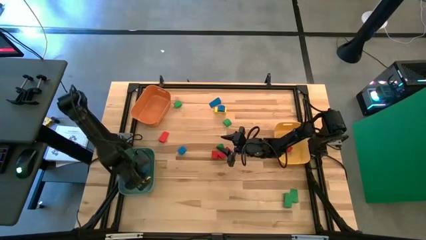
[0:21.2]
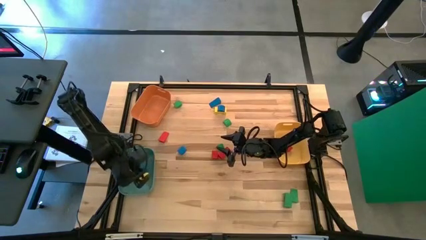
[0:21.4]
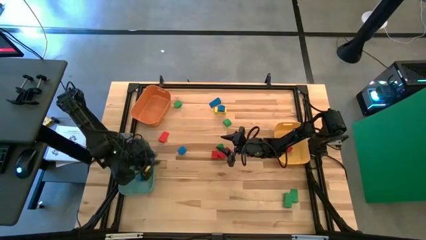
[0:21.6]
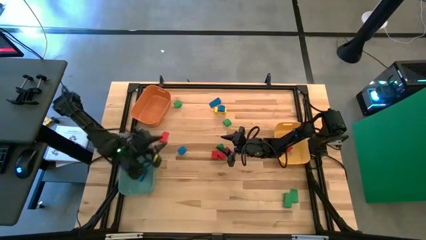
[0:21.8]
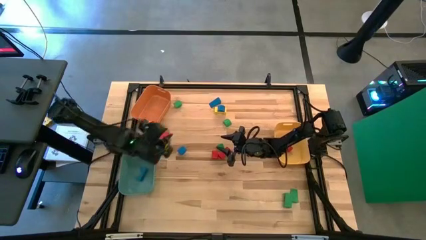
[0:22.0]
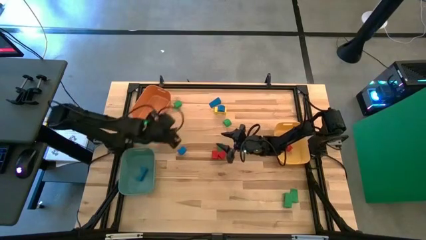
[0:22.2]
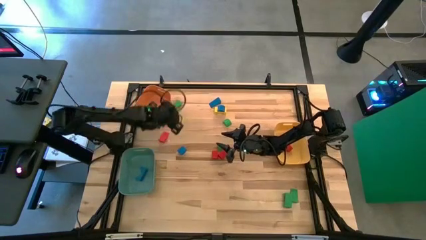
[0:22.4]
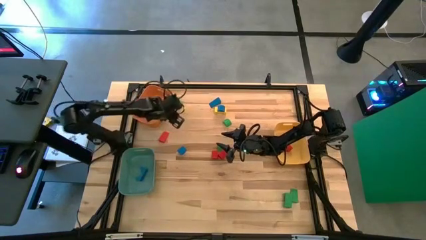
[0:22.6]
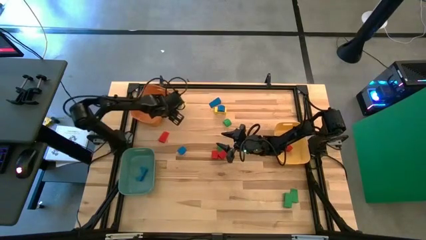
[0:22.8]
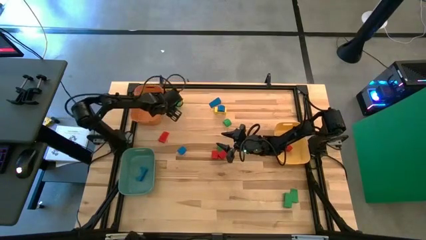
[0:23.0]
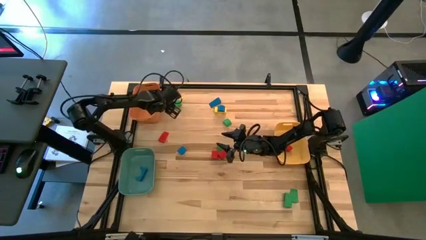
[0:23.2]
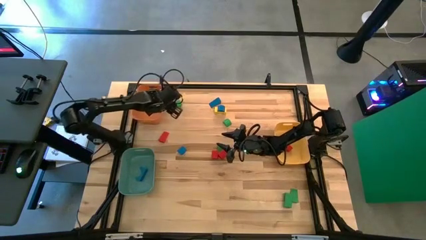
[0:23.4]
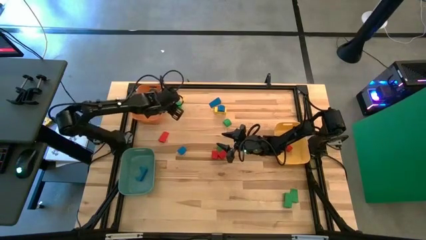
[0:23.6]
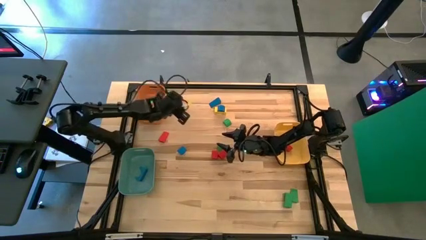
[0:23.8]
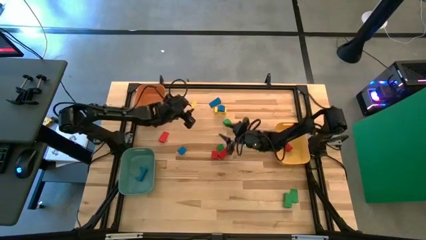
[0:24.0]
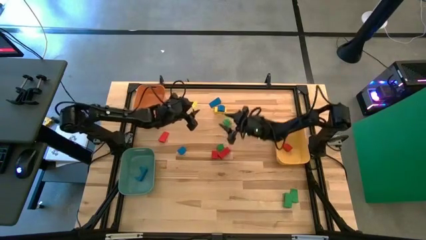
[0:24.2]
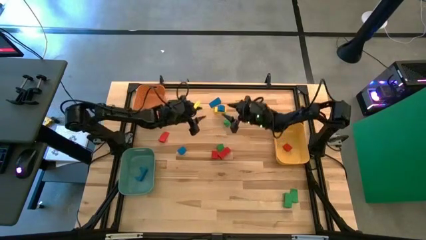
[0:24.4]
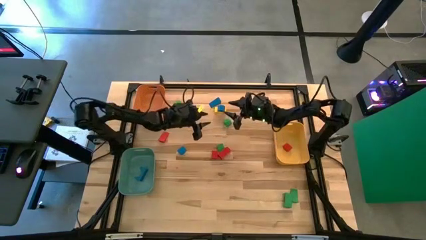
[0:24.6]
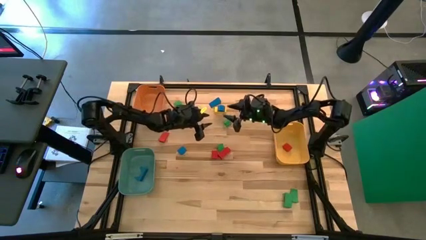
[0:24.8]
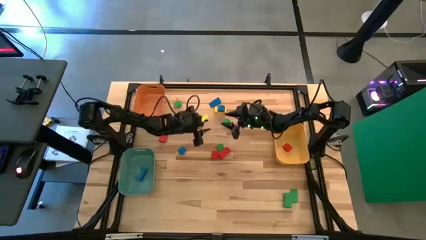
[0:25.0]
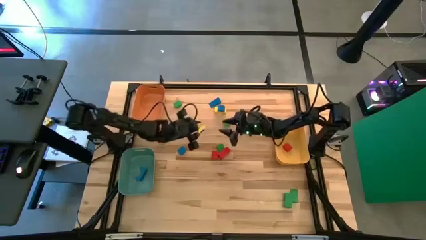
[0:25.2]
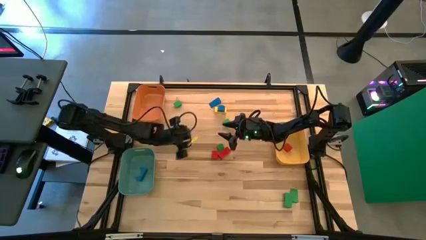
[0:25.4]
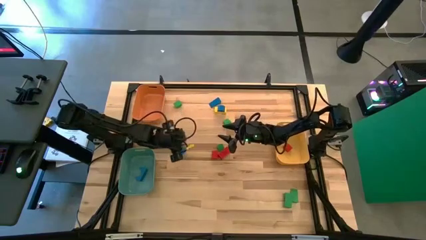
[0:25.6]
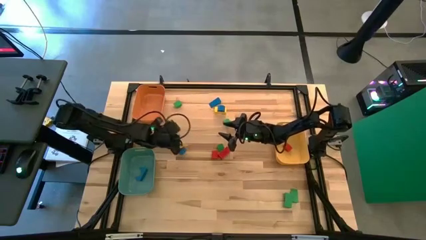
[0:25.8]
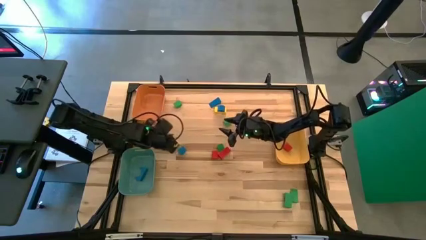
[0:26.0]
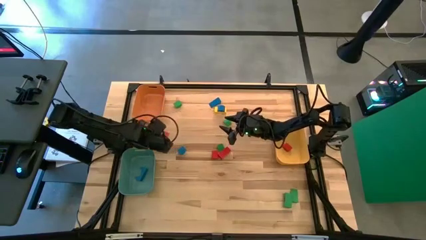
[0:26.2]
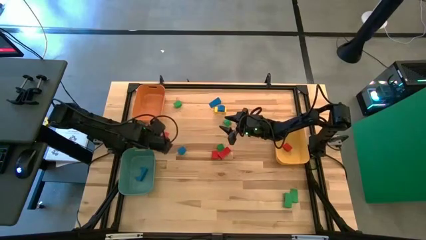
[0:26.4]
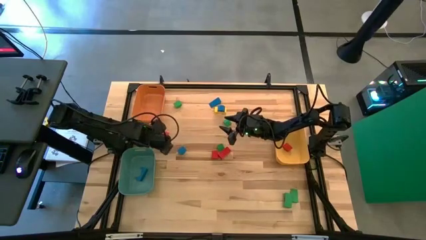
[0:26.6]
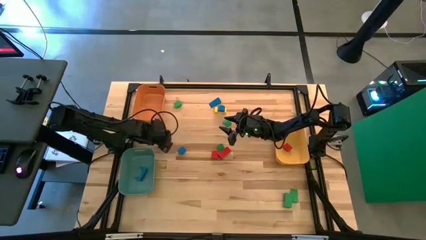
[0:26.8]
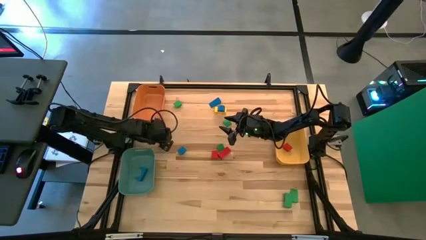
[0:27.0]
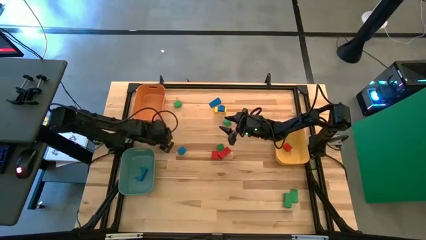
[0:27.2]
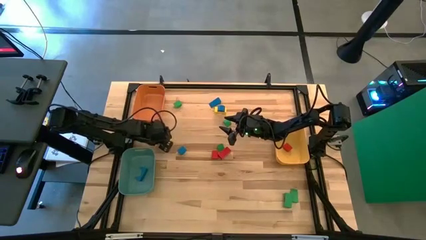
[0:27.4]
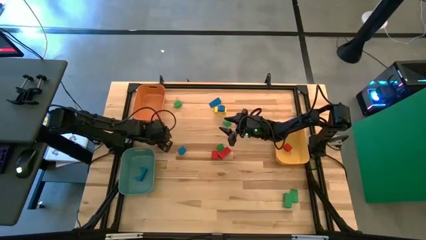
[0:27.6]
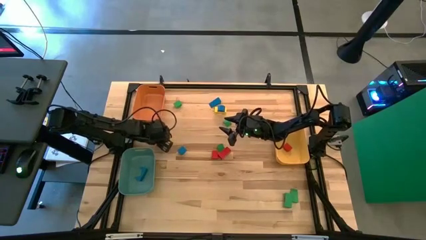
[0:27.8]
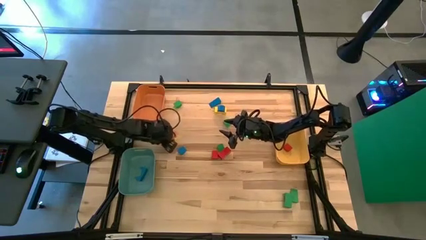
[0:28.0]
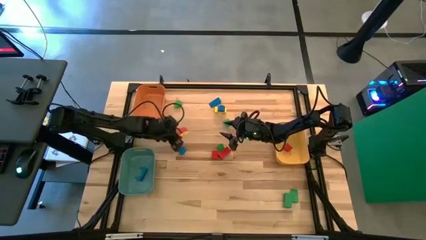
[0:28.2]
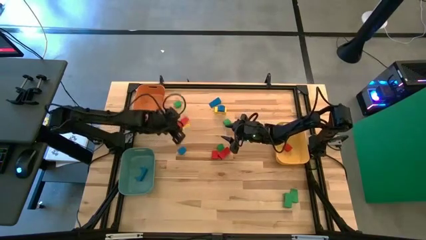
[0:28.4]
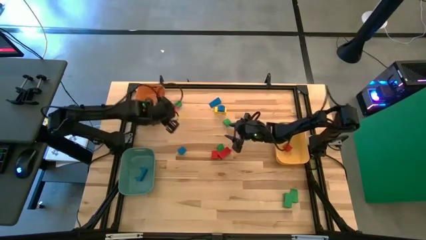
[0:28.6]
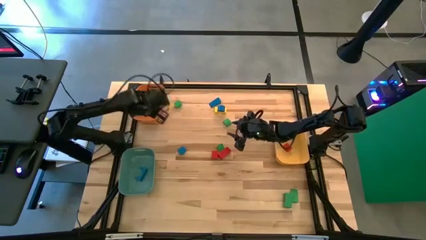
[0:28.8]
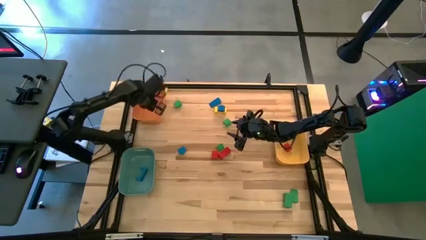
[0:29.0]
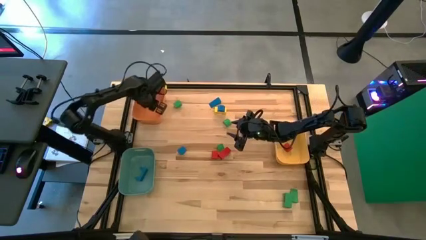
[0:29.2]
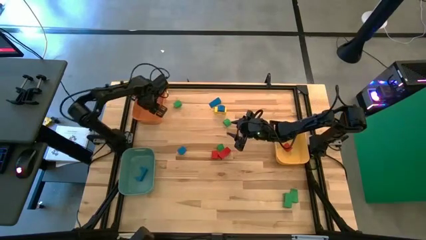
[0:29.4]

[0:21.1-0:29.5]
Task: Sort blocks by size
Put the red triangle block into the orange bin

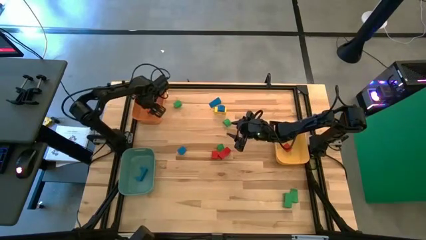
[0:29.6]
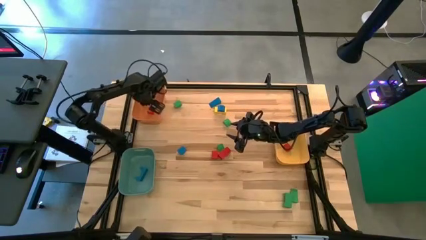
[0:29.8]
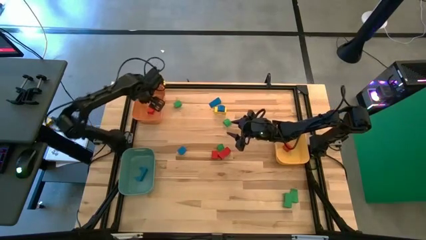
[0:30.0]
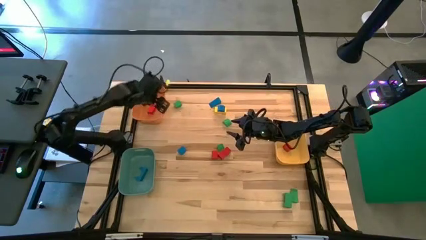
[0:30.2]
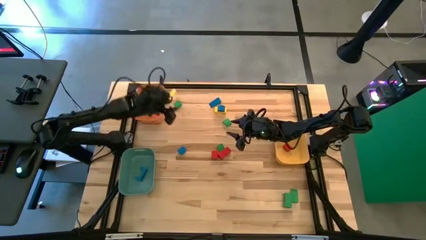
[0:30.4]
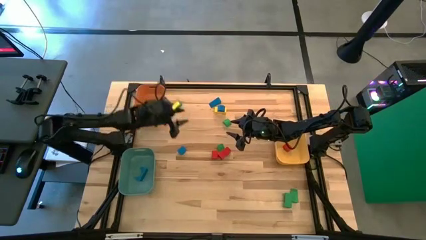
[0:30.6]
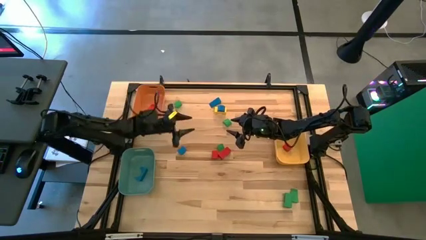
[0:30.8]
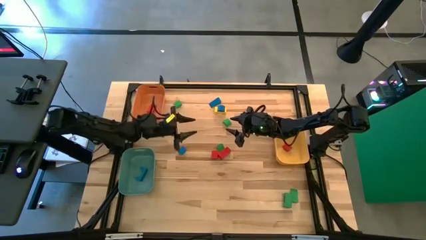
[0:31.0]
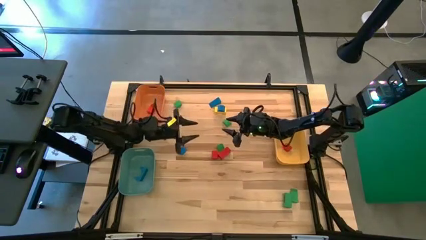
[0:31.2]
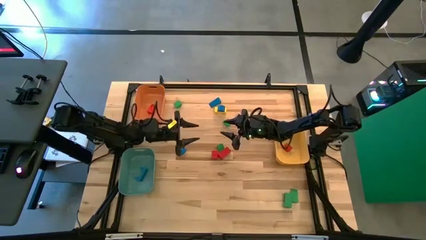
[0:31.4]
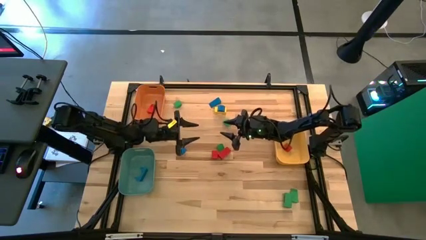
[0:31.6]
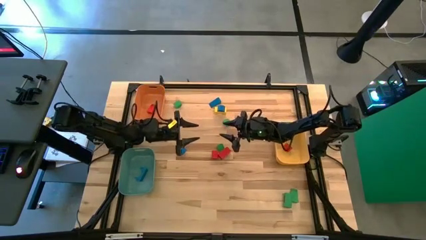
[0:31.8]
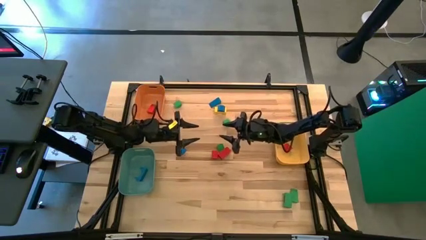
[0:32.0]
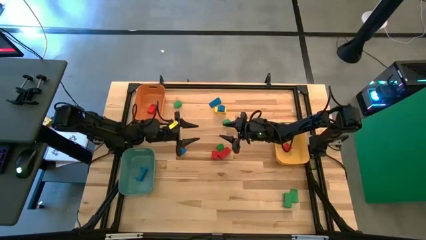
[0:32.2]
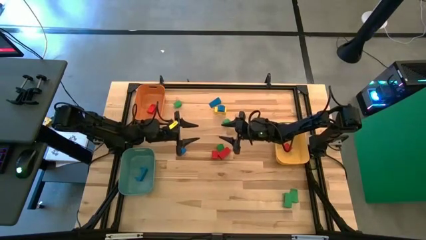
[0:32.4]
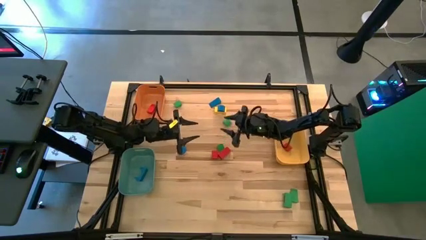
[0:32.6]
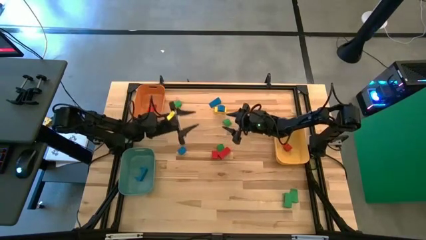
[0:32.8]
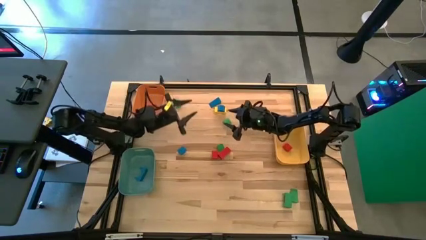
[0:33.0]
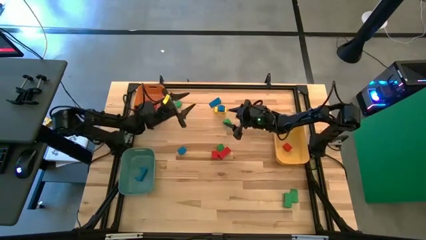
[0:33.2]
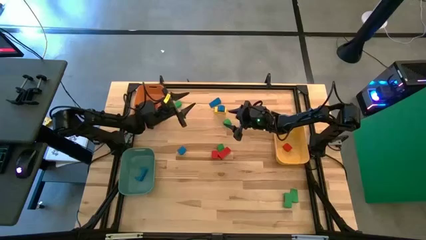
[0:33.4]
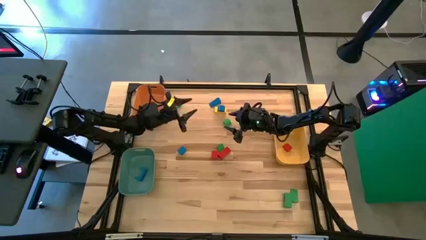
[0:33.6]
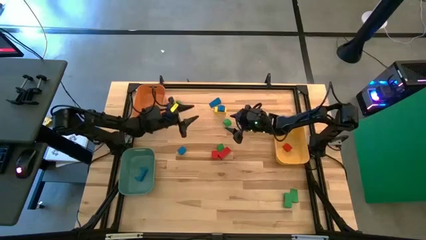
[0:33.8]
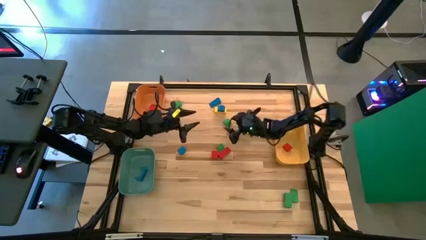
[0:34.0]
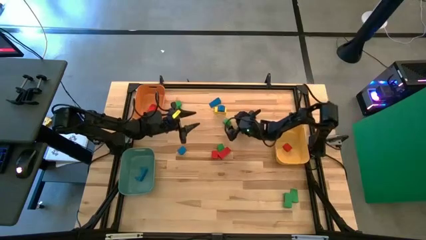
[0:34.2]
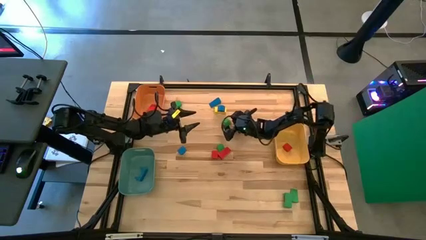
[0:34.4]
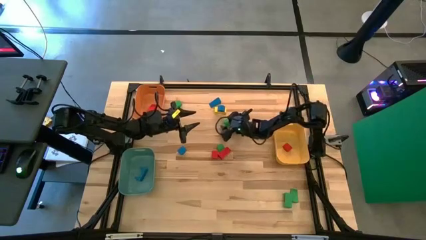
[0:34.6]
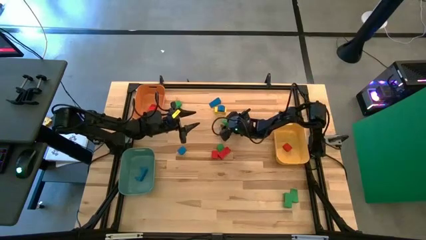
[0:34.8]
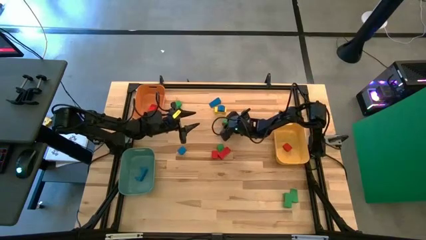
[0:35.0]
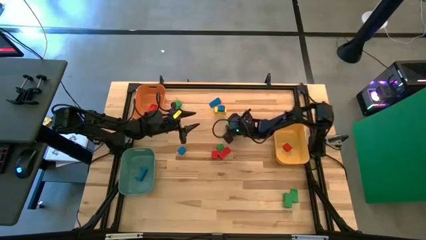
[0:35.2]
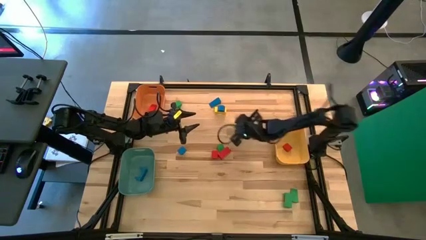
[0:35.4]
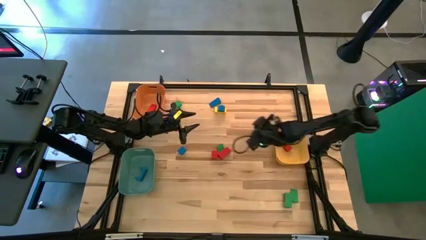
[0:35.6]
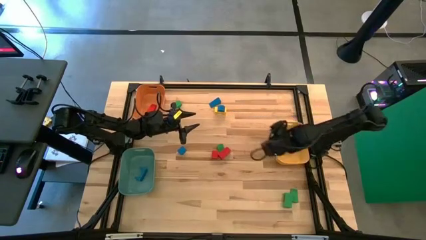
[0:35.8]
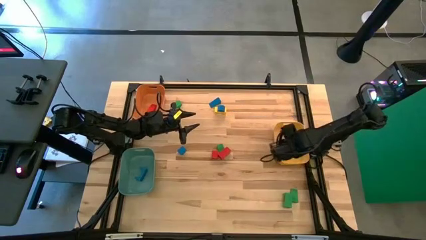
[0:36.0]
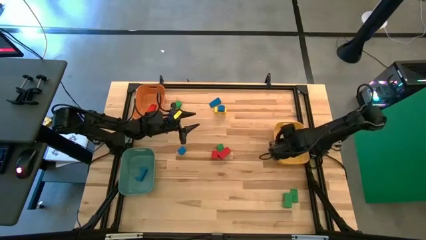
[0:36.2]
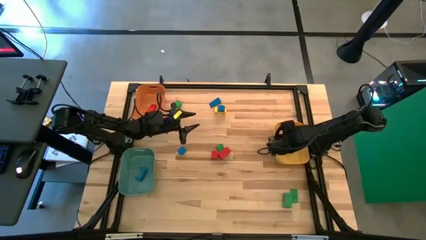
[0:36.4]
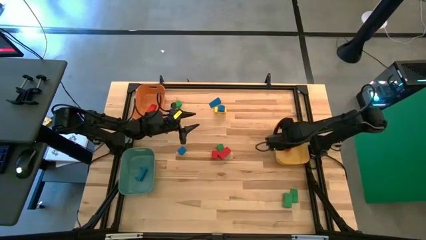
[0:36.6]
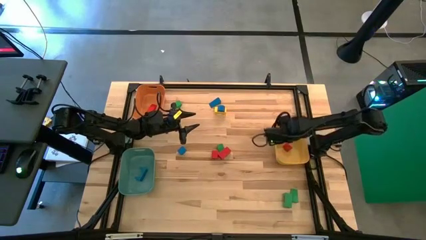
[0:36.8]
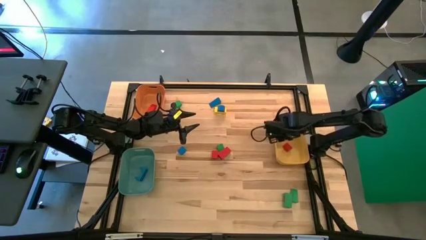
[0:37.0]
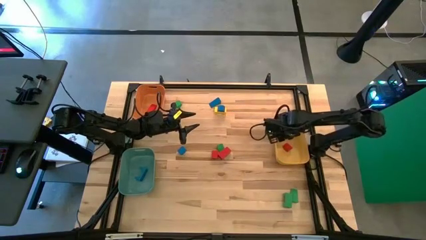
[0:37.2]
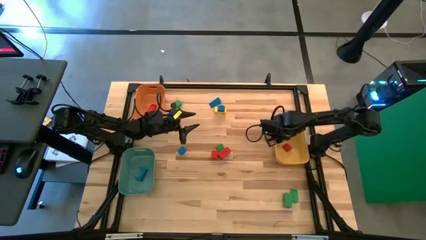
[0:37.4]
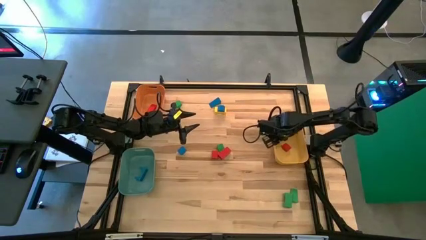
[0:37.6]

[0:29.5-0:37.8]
Put the green half-circle block into the yellow bin

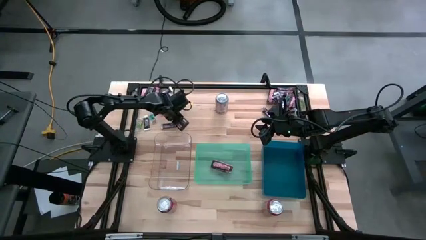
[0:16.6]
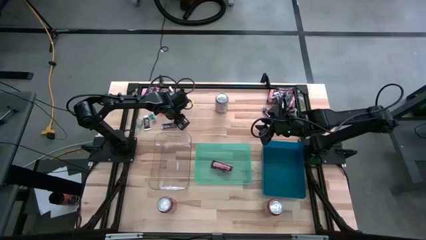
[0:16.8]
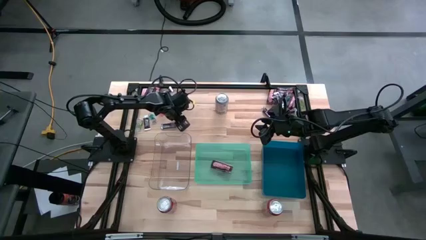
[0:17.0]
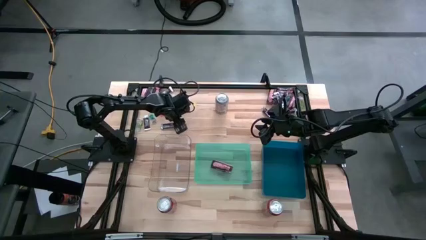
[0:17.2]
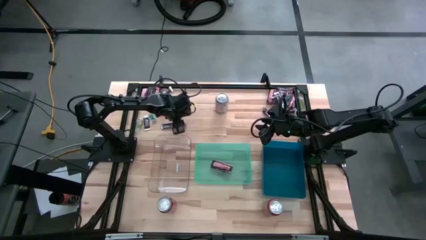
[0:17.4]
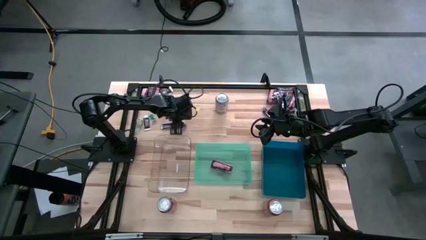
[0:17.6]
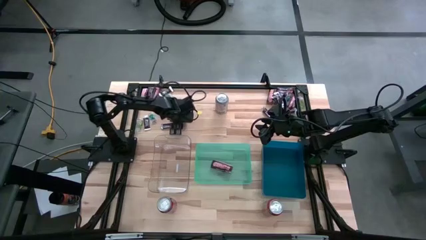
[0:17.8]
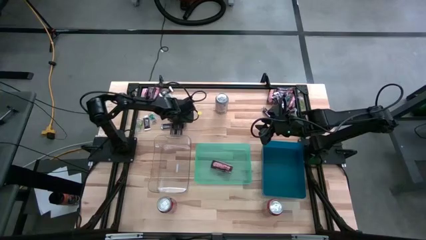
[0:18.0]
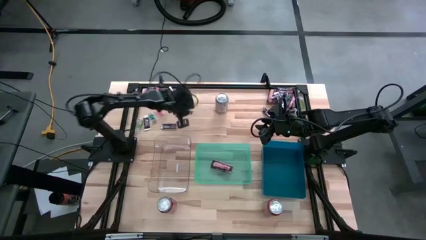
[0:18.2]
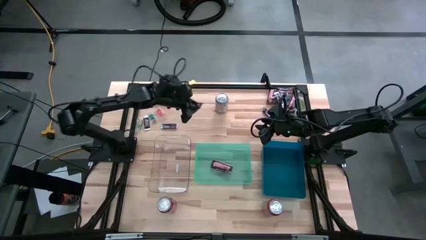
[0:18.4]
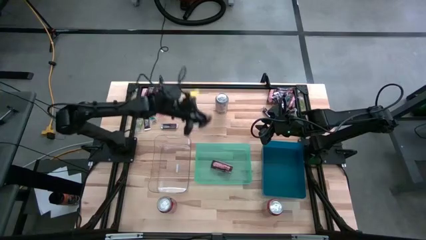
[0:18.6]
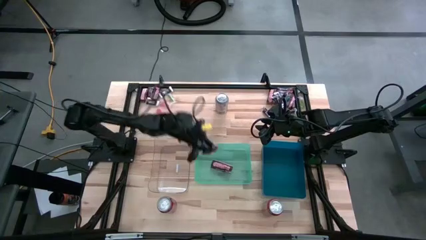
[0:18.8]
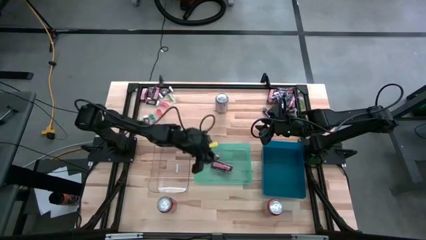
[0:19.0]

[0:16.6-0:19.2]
Task: Organize candy in baskets
Put the brown chocolate bar into the green bin
